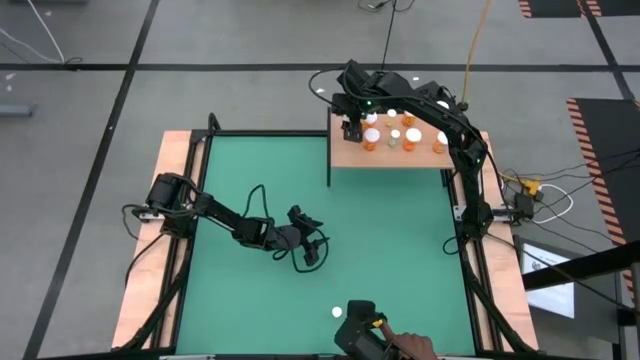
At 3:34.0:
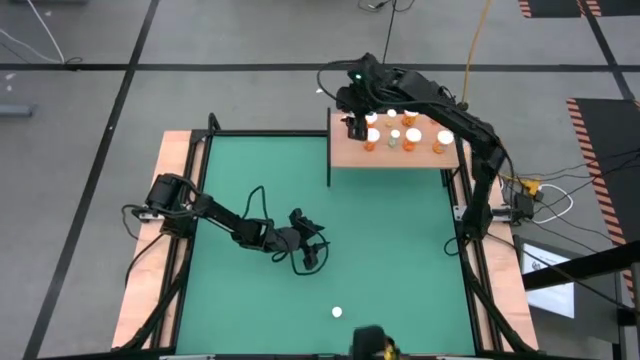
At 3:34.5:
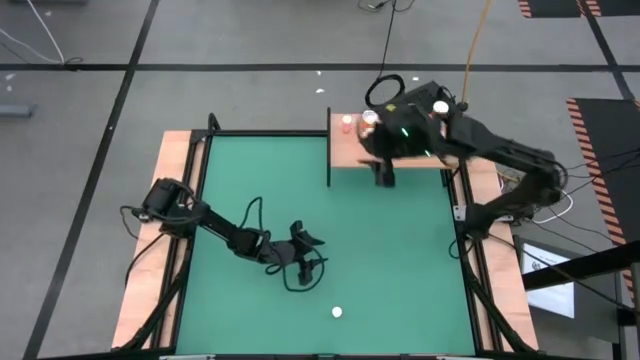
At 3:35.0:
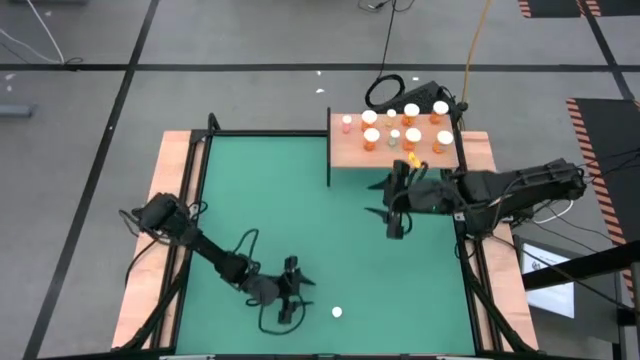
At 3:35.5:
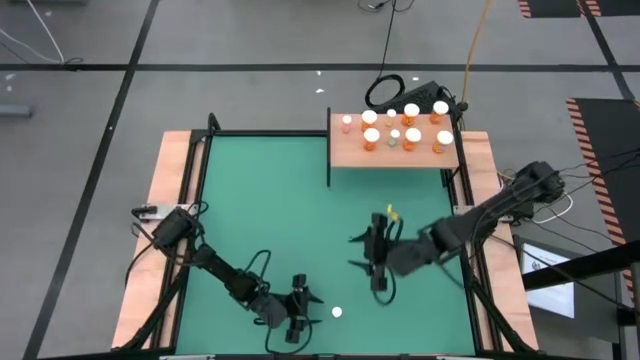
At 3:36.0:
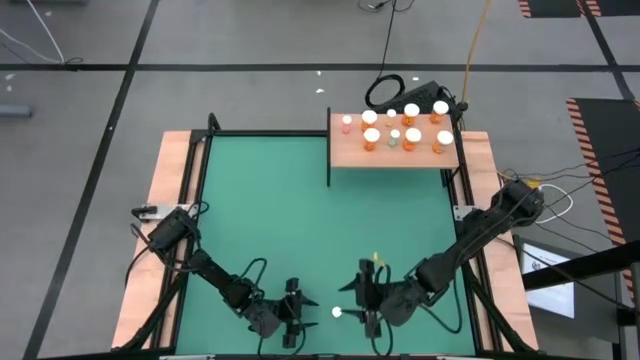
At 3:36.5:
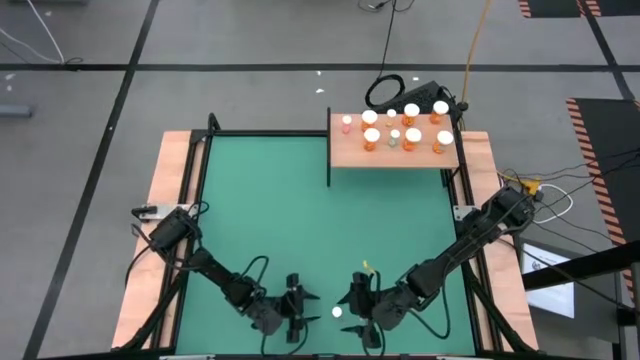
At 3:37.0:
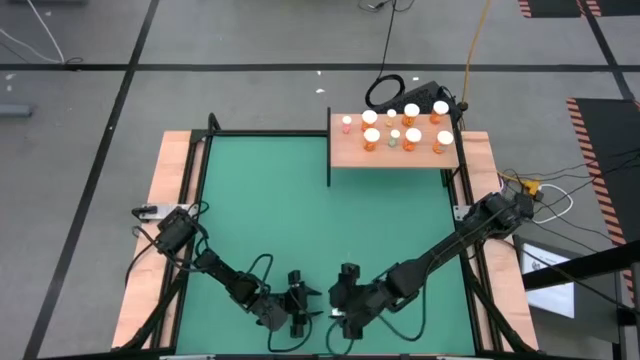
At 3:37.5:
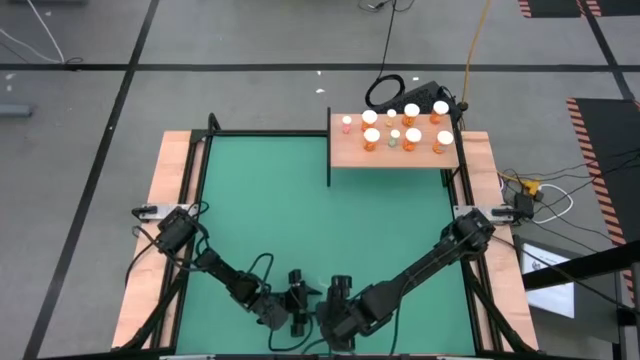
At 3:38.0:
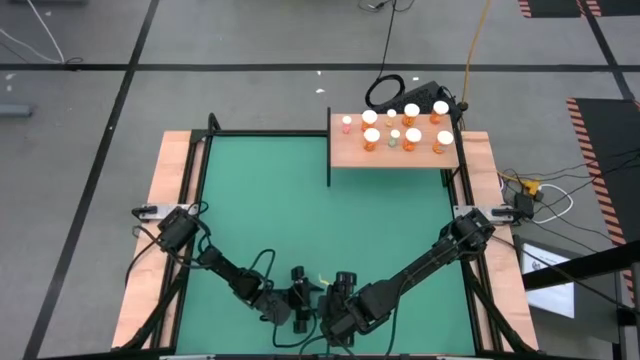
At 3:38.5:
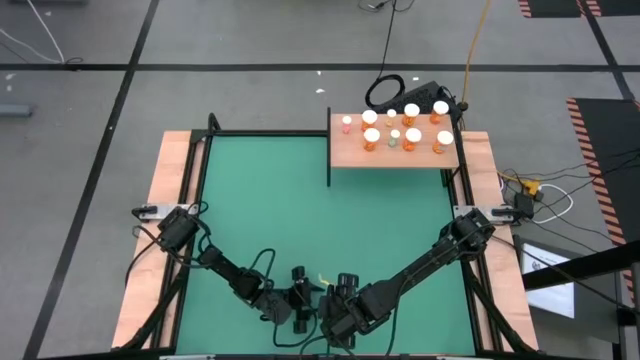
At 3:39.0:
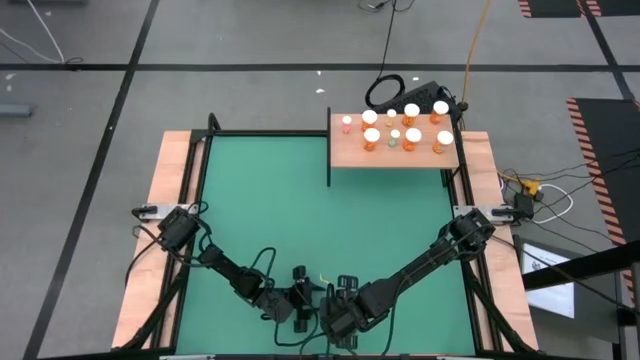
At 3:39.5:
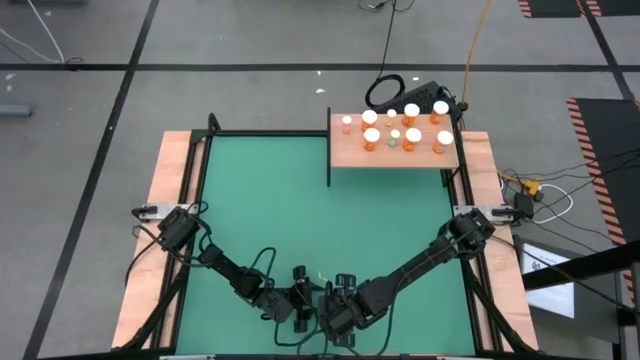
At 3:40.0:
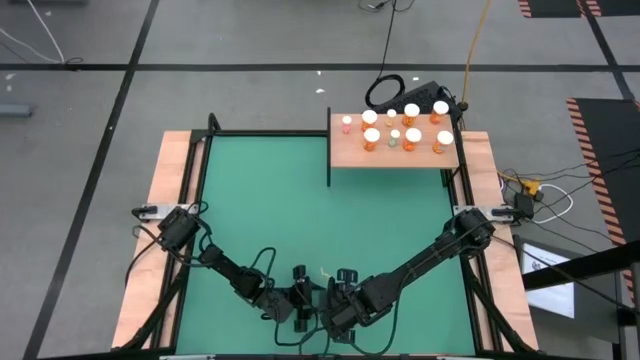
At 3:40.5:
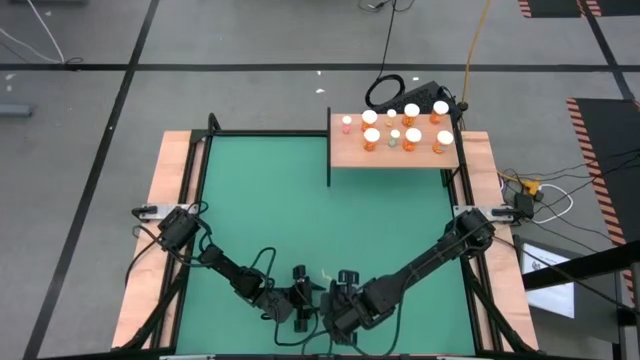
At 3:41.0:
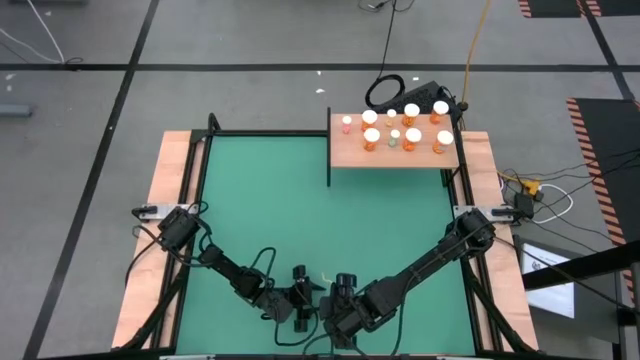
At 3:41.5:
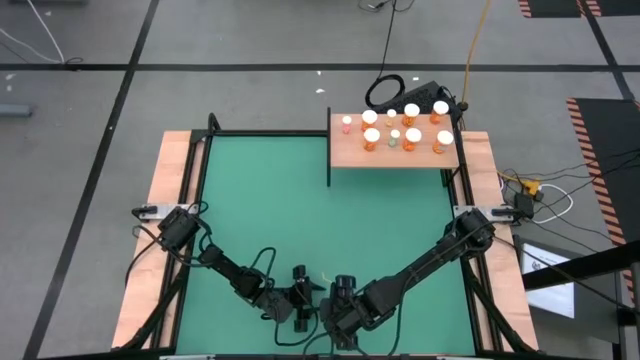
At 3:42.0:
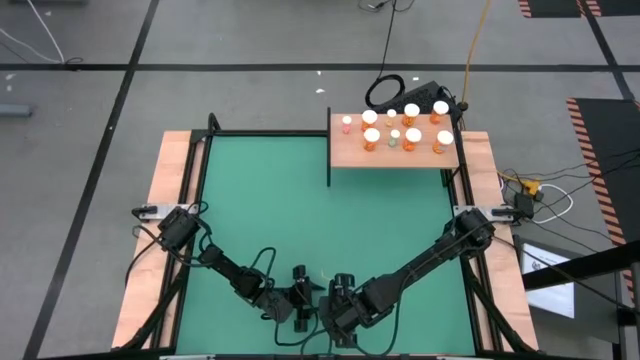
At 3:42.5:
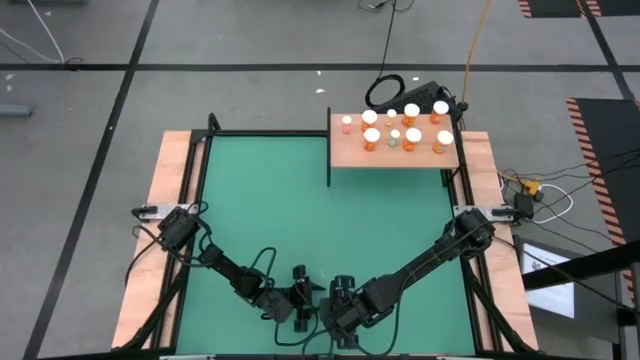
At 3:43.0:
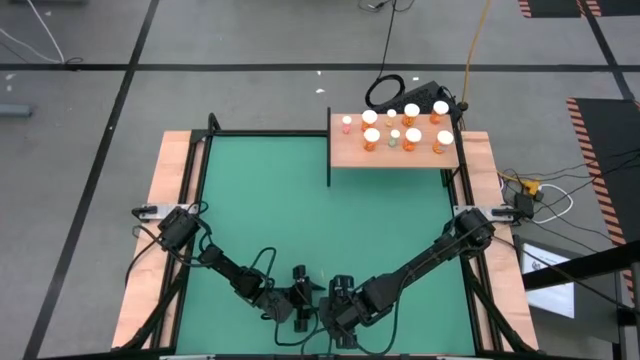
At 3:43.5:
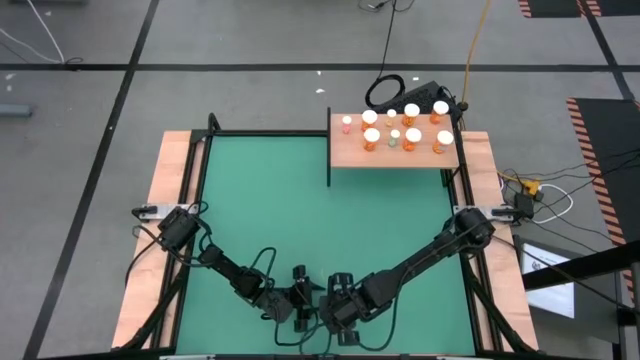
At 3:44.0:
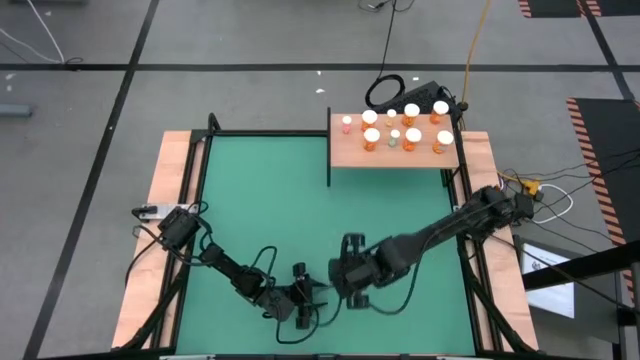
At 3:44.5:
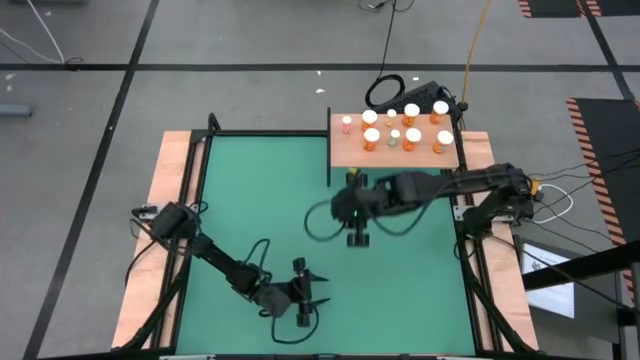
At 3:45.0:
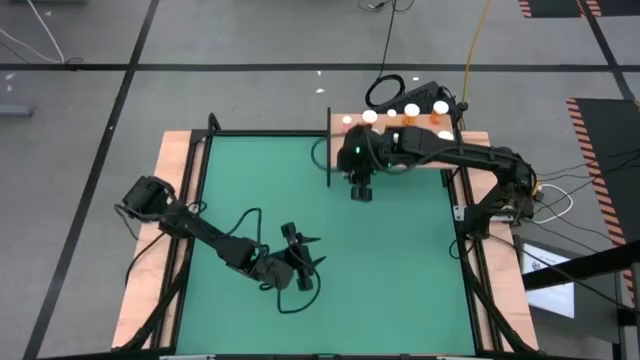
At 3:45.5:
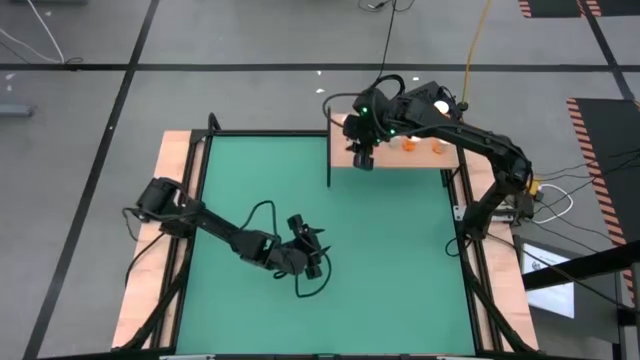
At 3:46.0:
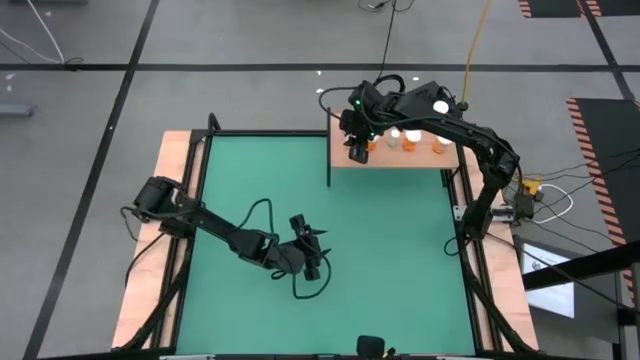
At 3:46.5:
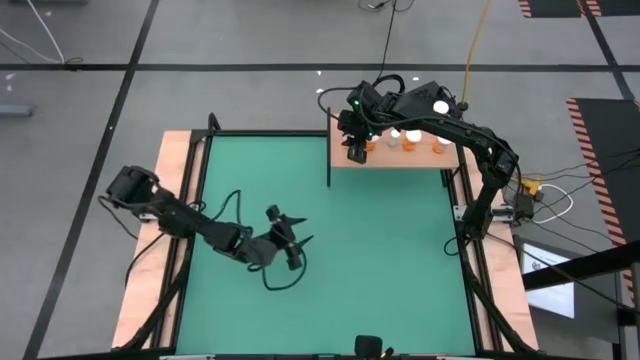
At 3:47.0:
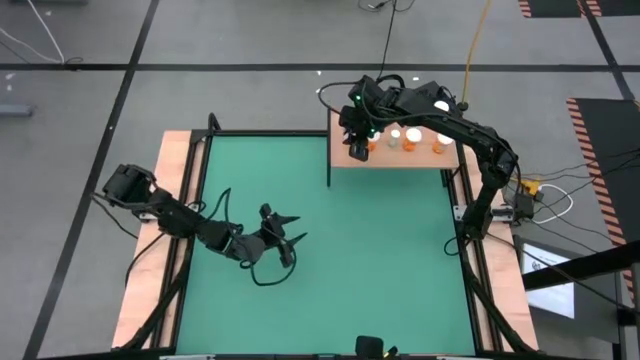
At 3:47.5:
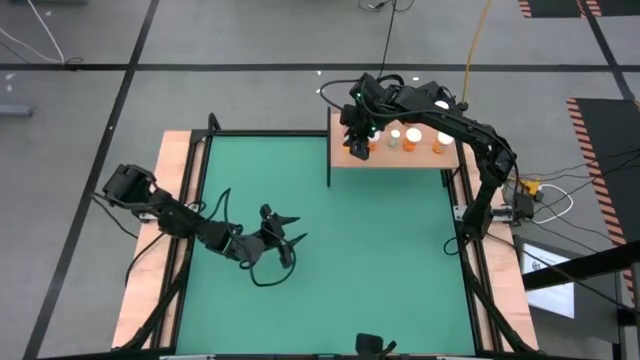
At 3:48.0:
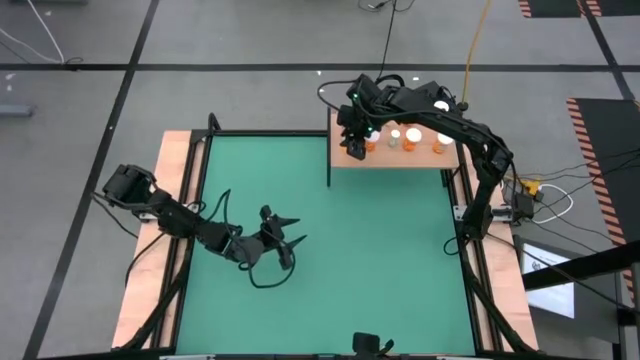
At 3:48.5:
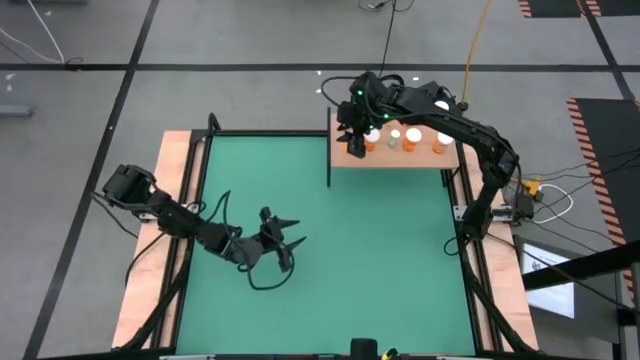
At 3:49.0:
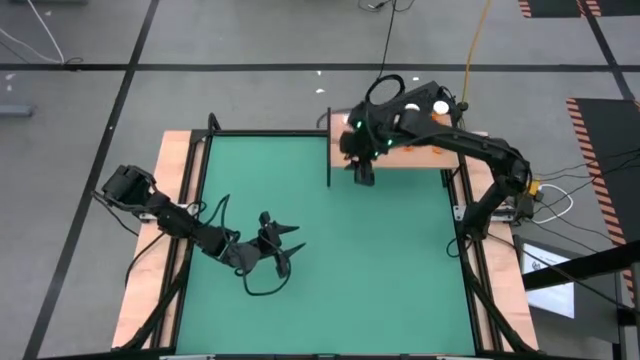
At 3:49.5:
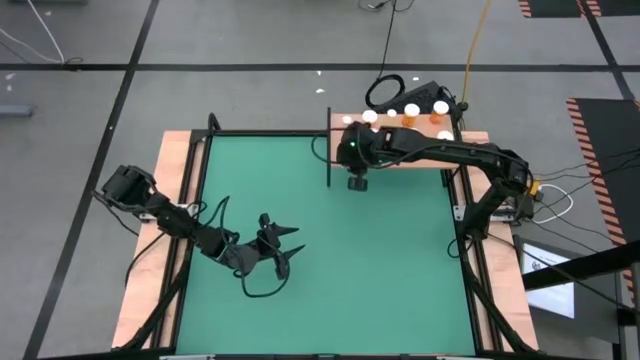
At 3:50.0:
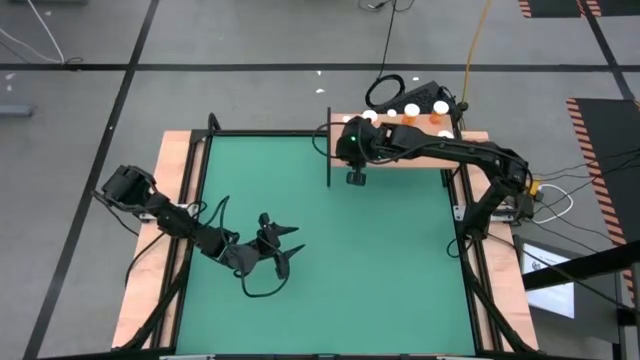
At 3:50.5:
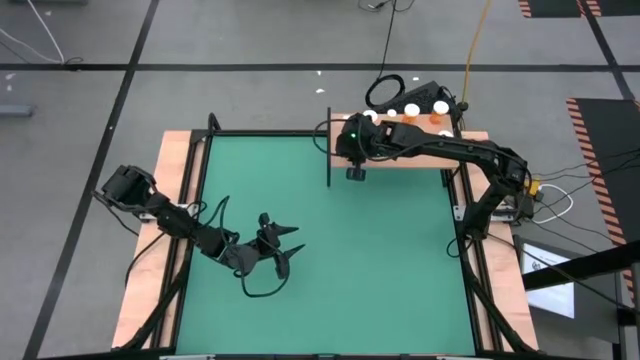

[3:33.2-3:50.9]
Task: Pick and place medicine bottles onto shelf by color
Put the light orange pill bottle on the shelf

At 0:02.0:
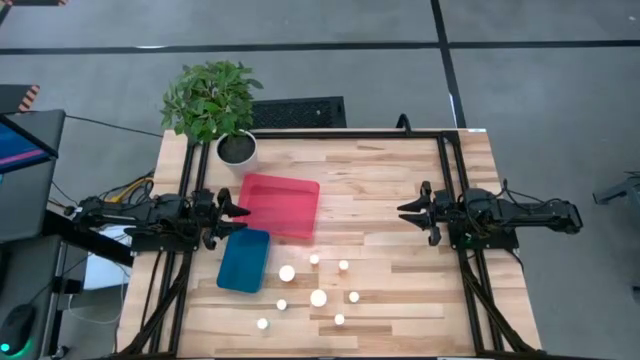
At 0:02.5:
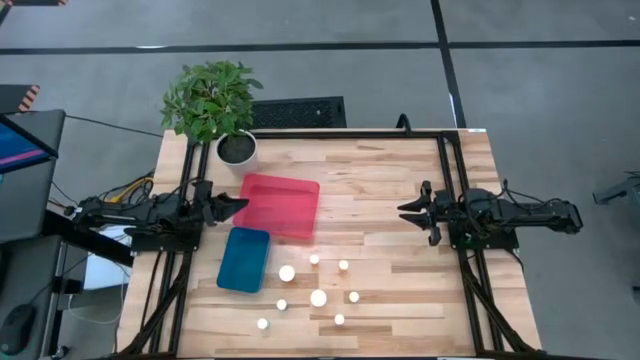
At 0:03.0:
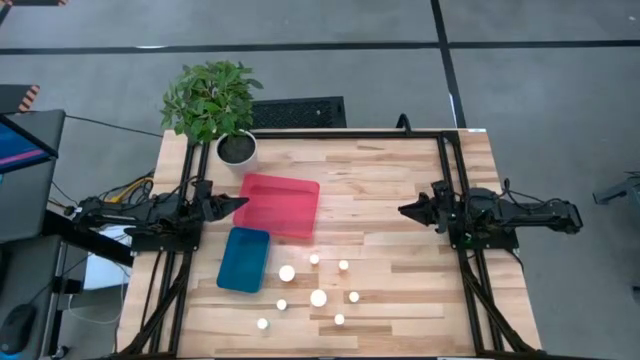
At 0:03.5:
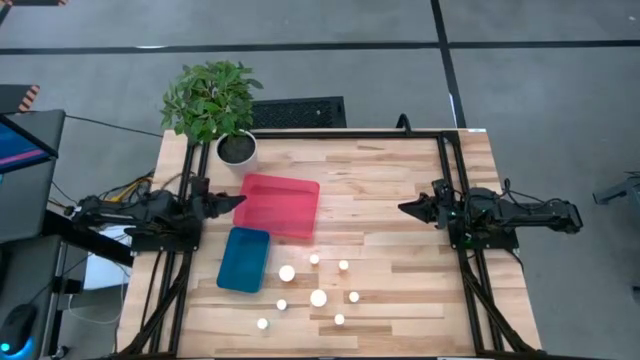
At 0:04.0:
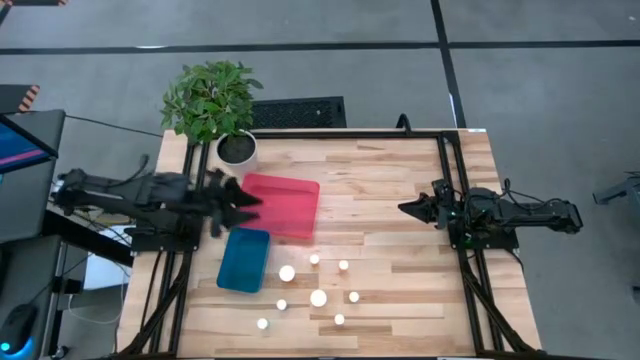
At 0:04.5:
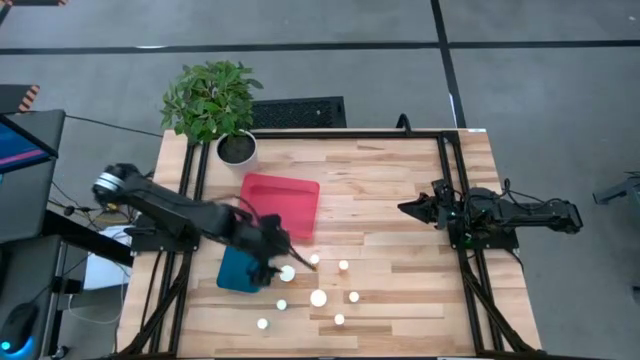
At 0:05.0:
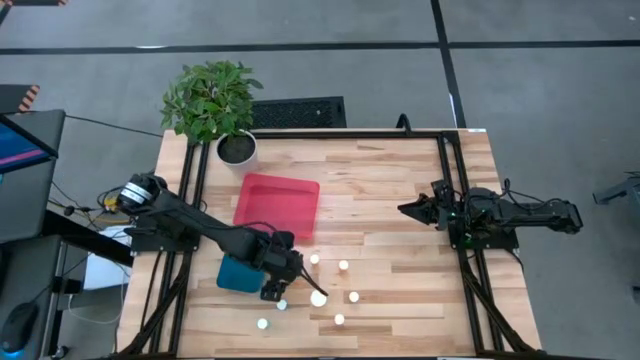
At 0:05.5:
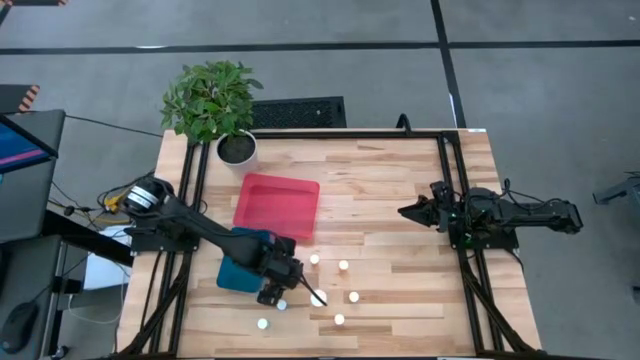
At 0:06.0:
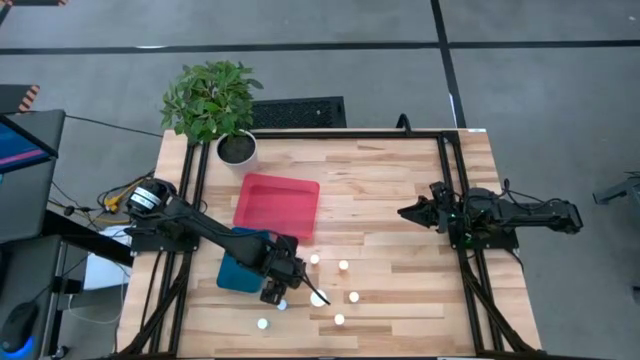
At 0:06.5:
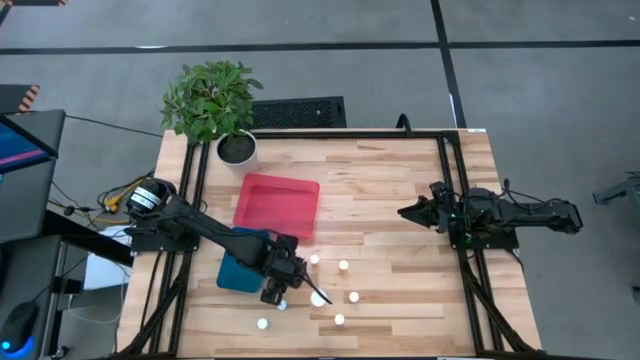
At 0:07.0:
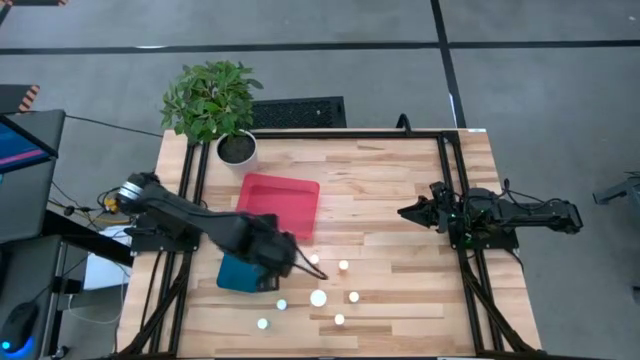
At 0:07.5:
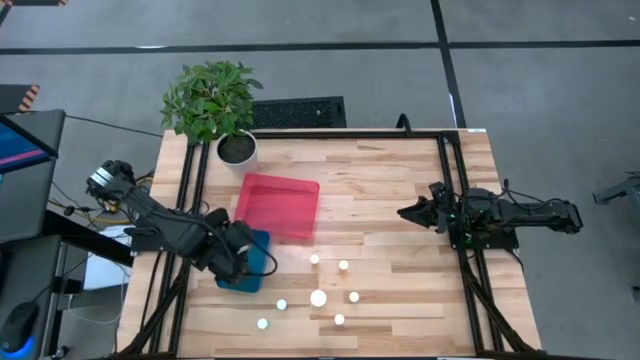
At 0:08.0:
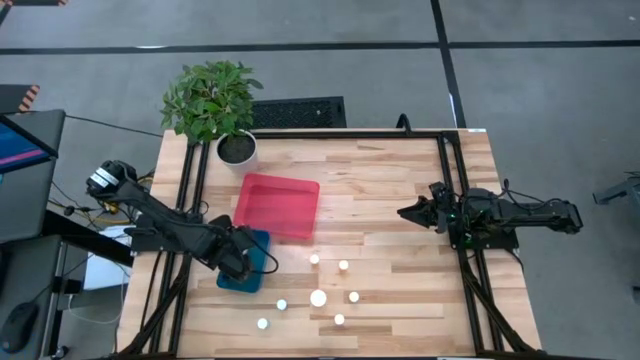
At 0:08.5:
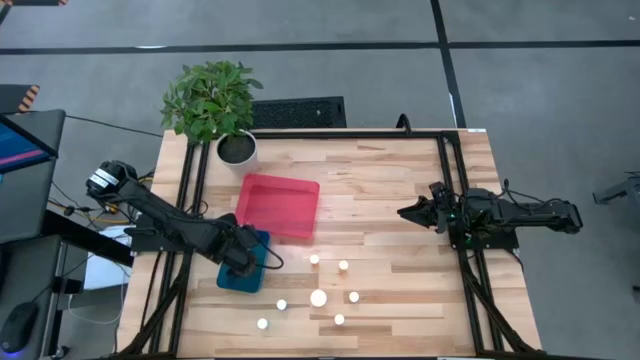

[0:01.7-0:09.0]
Task: Pick and place medicine bottles into bin by pill shape (circle, oval)
Put the orange capsule bottle into the blue bin
